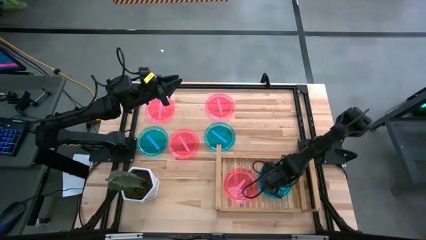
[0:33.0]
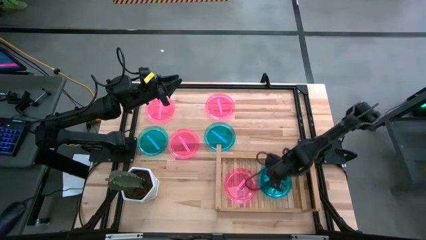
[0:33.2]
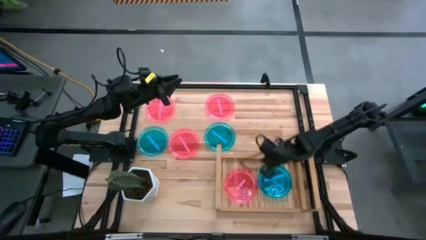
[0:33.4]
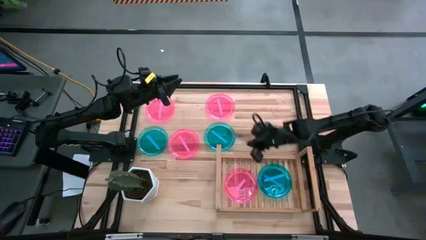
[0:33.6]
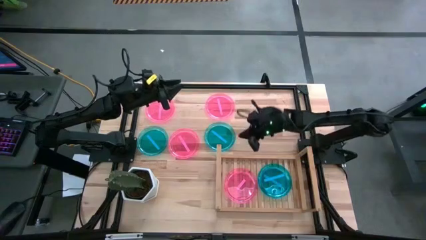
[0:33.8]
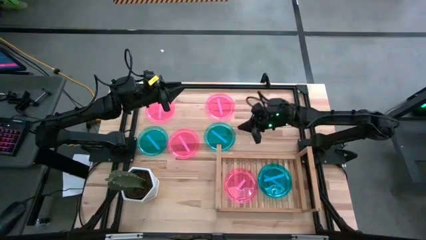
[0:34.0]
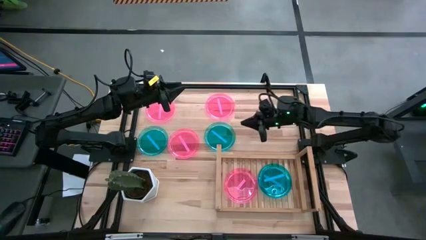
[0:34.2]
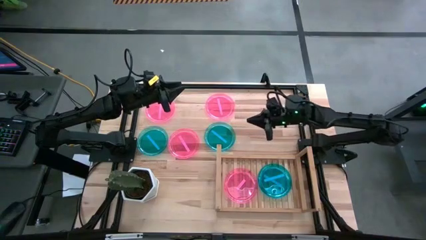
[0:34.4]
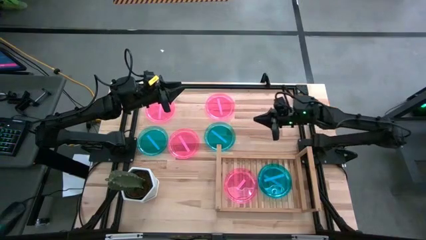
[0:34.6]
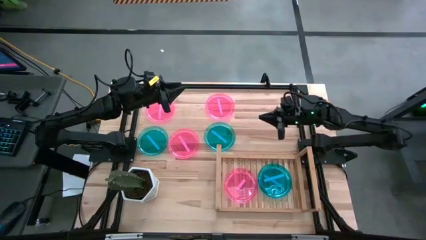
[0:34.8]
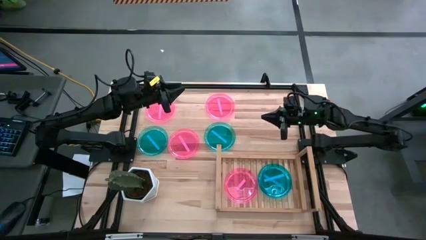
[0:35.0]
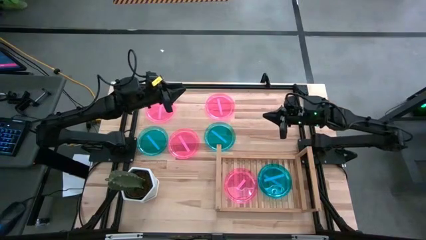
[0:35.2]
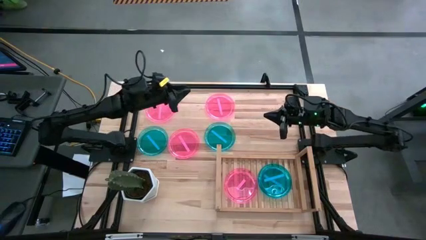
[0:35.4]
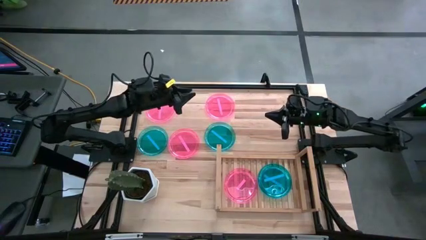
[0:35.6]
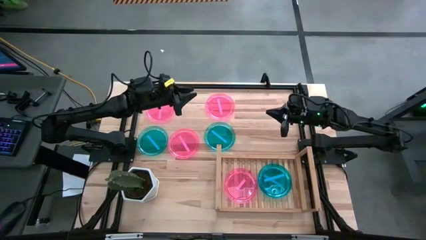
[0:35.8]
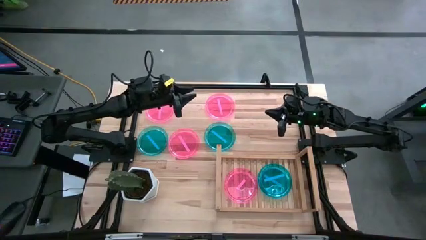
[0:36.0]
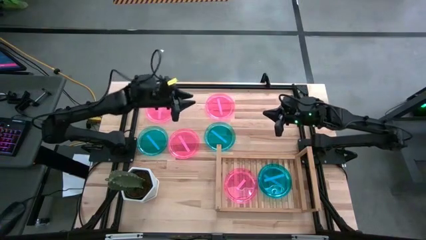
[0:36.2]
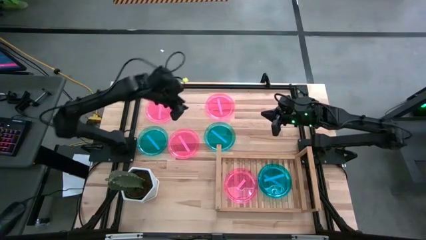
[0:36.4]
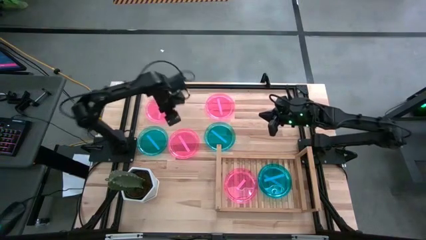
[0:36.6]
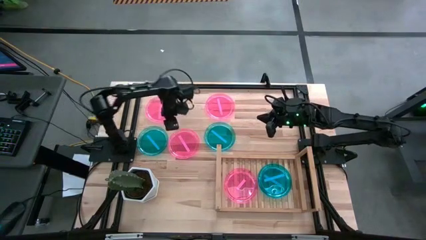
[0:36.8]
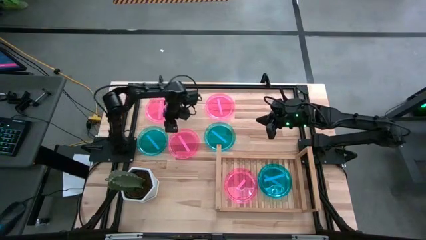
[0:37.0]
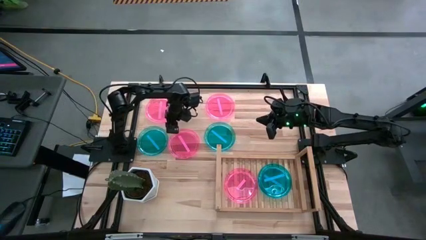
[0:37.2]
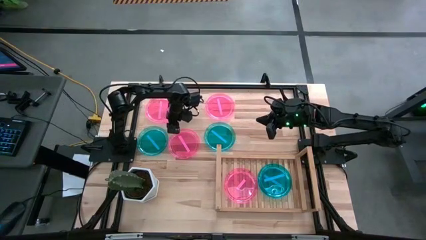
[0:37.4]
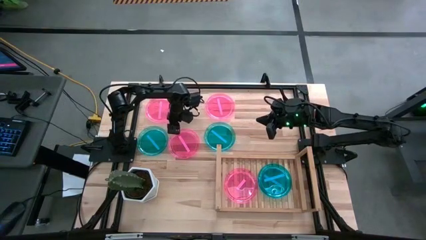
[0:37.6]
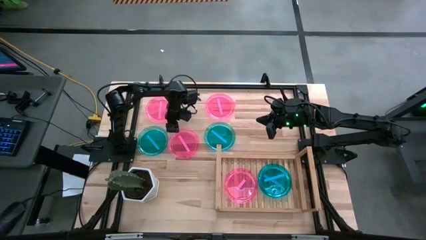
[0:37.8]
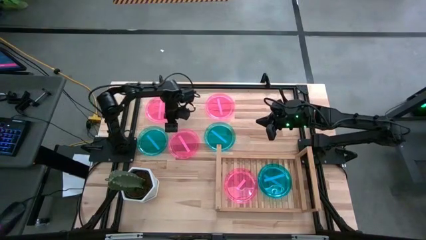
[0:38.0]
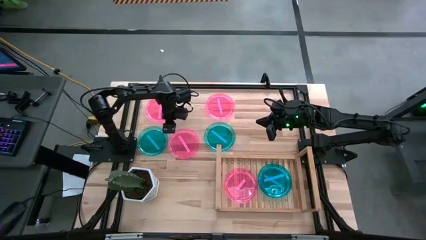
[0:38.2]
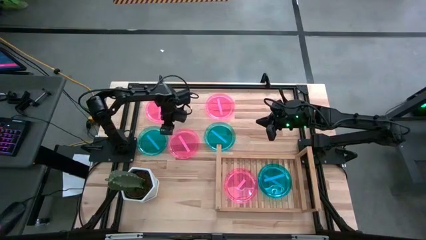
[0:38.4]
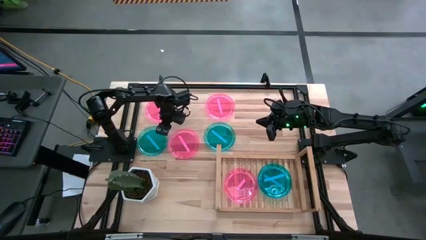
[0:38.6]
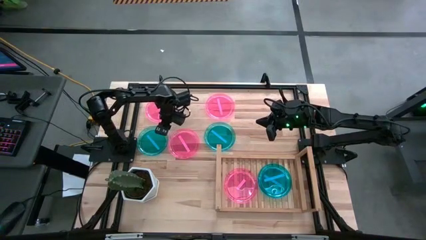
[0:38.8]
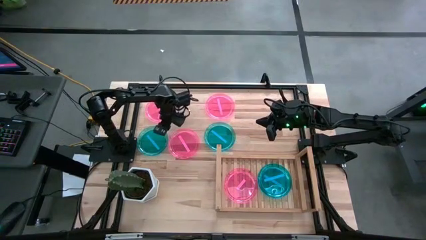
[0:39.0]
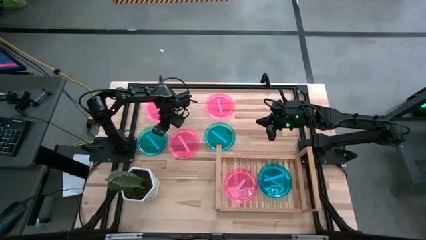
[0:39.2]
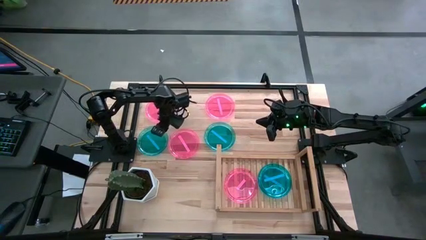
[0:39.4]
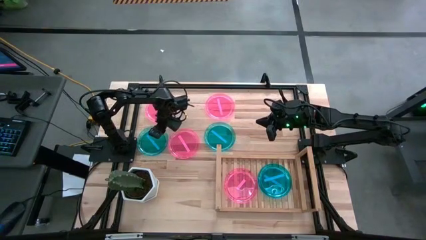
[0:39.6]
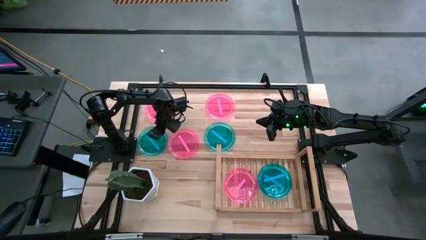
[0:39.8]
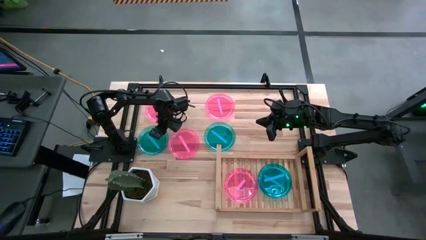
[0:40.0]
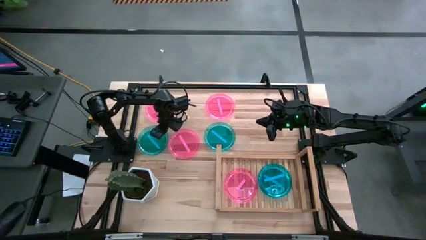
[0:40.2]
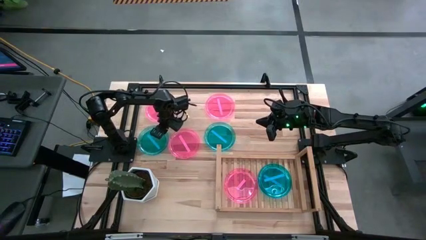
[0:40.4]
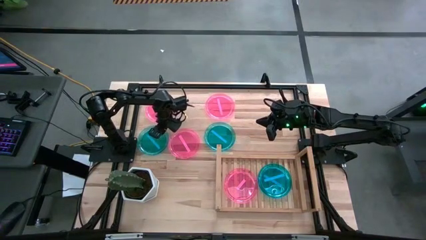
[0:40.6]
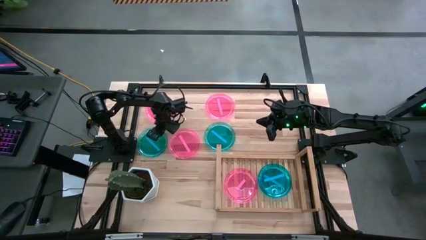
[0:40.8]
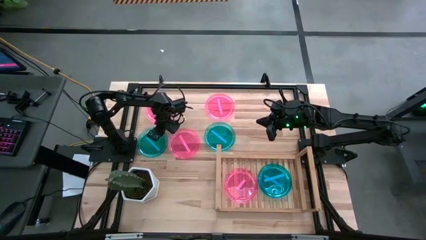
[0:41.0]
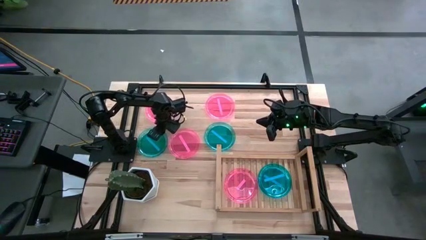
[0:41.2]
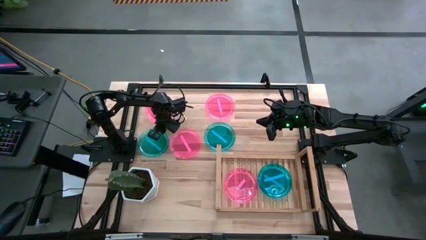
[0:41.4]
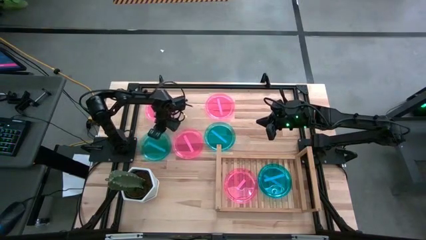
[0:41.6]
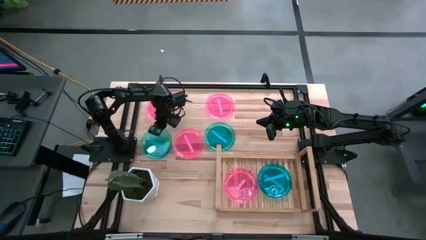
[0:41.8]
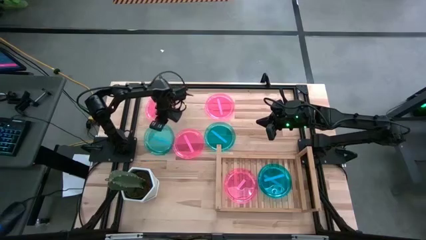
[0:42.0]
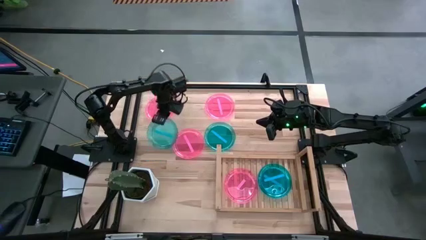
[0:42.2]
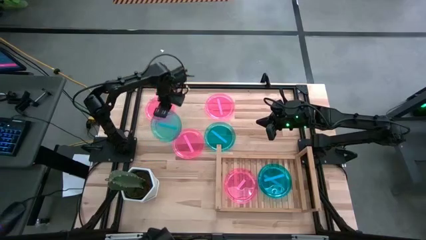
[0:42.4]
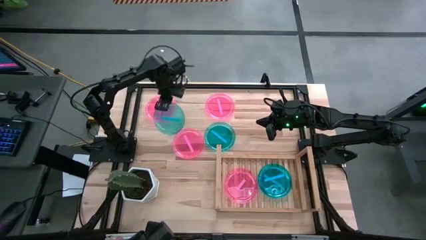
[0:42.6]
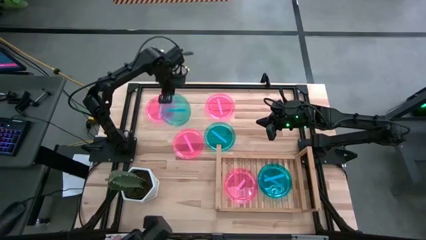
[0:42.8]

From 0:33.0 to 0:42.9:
Task: Place and stack plates onto a shelf
Stack the blue plate on top of the blue plates on the shelf
